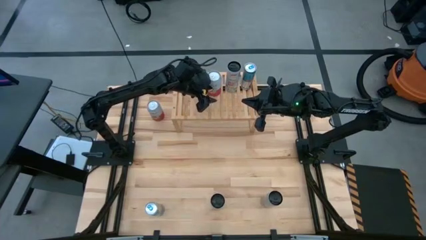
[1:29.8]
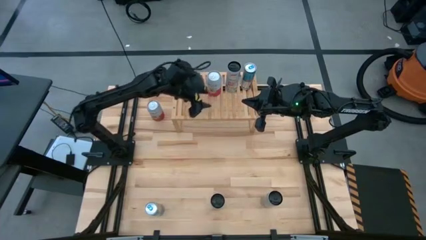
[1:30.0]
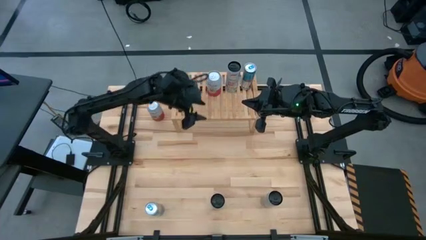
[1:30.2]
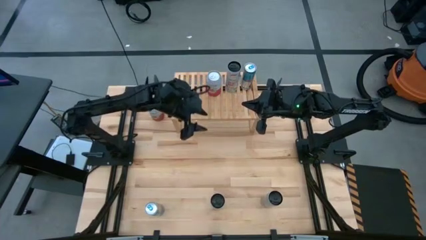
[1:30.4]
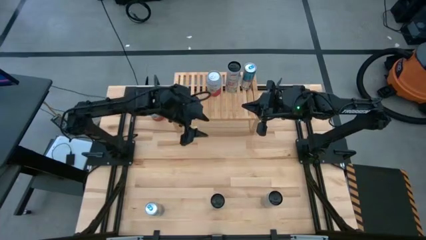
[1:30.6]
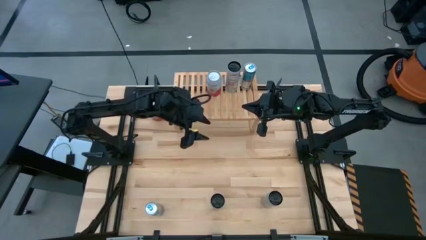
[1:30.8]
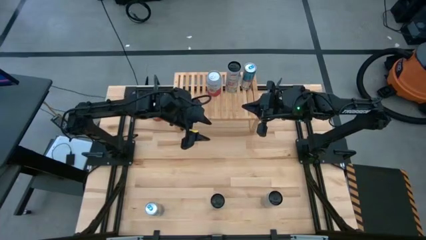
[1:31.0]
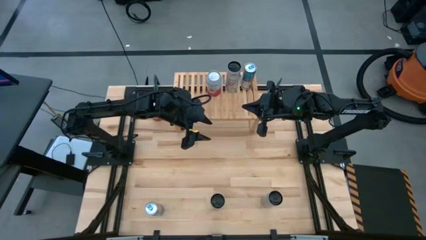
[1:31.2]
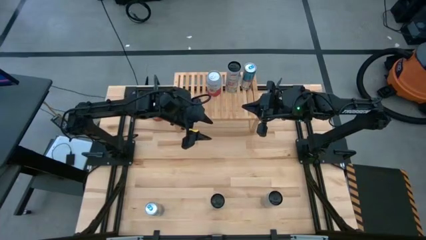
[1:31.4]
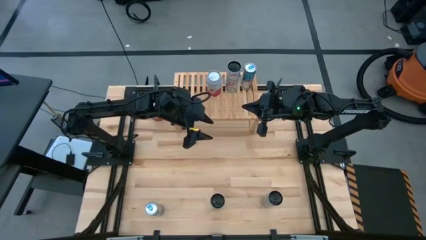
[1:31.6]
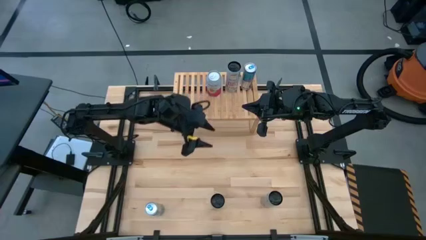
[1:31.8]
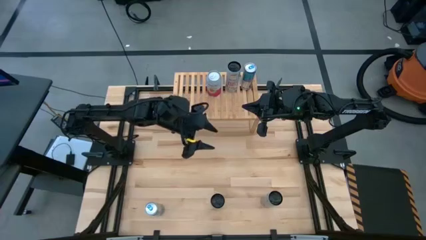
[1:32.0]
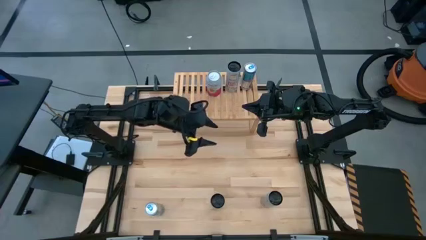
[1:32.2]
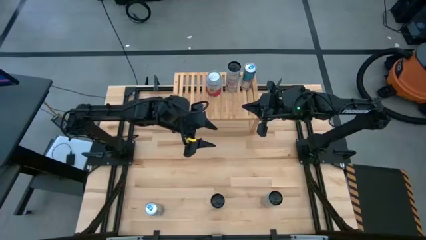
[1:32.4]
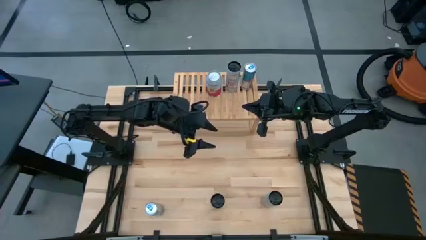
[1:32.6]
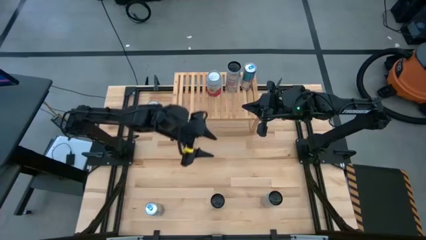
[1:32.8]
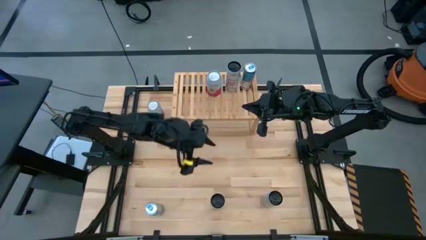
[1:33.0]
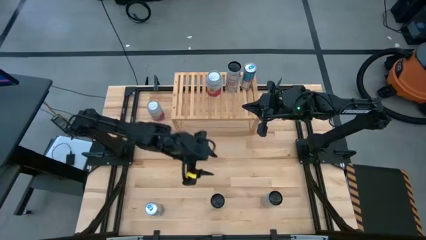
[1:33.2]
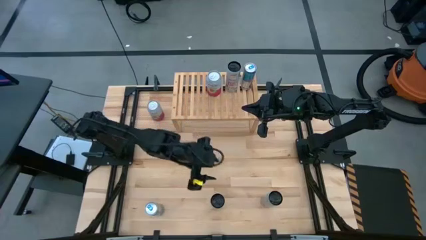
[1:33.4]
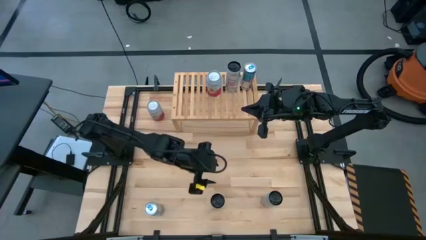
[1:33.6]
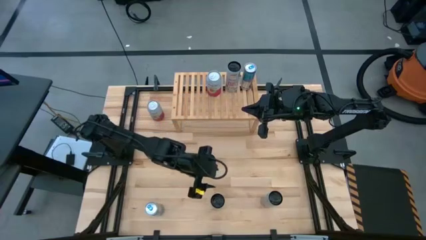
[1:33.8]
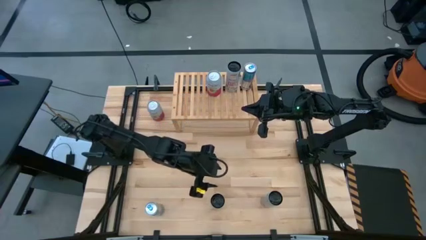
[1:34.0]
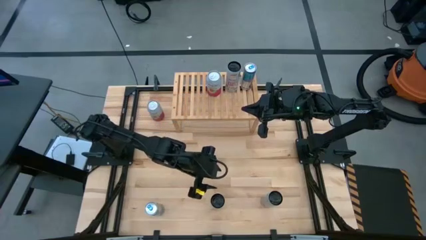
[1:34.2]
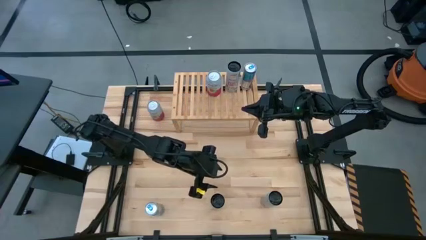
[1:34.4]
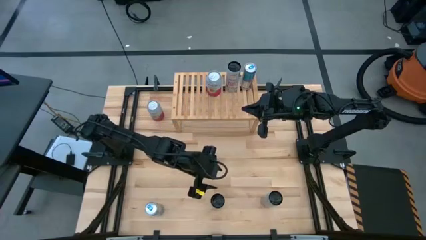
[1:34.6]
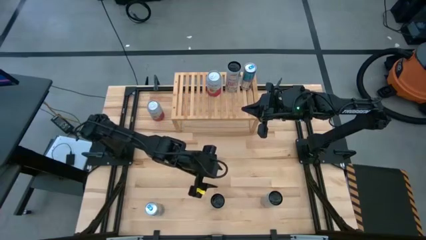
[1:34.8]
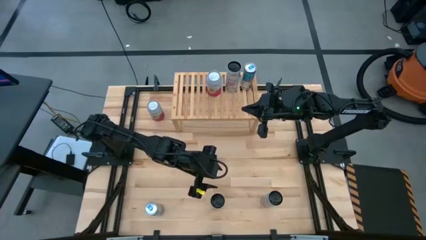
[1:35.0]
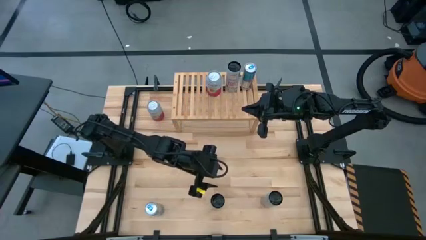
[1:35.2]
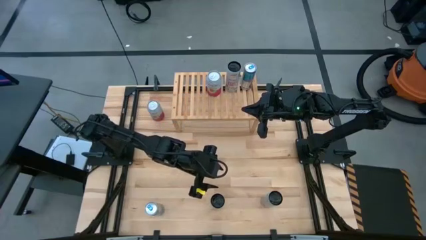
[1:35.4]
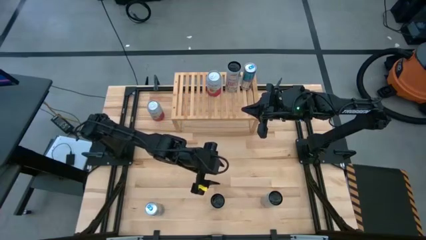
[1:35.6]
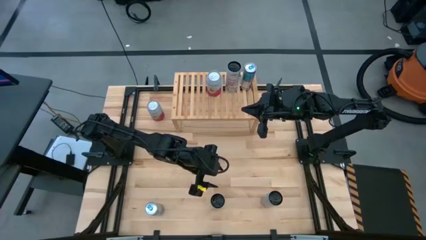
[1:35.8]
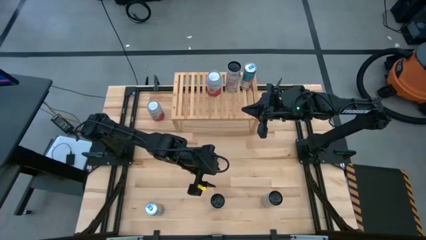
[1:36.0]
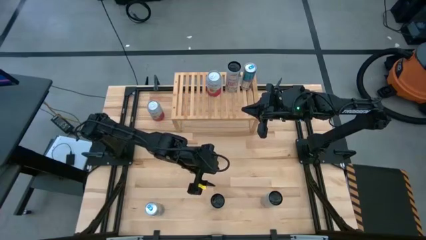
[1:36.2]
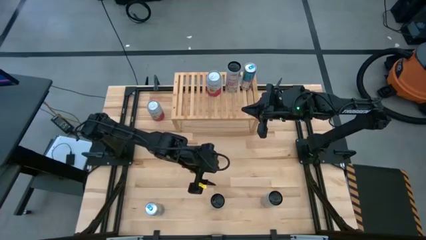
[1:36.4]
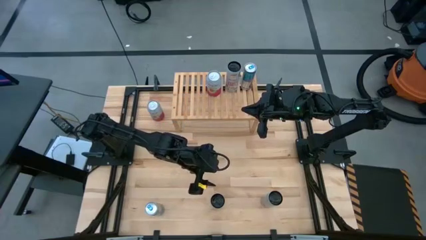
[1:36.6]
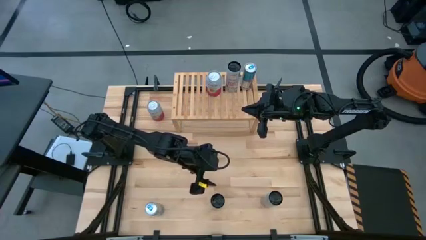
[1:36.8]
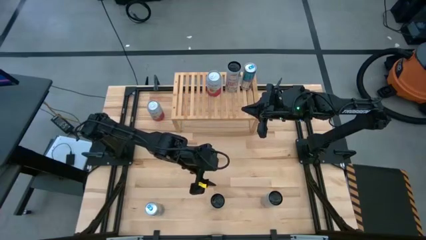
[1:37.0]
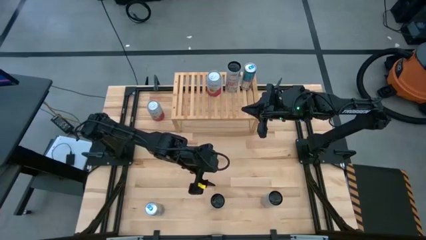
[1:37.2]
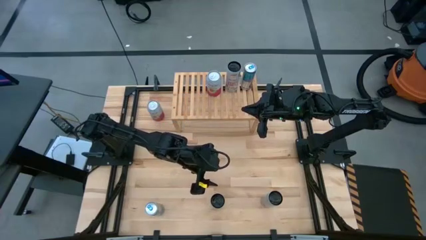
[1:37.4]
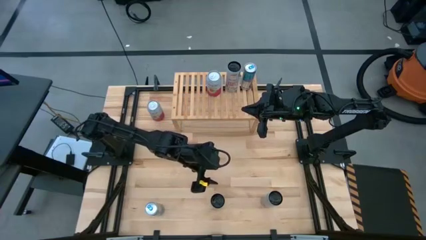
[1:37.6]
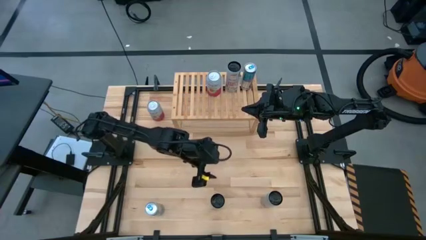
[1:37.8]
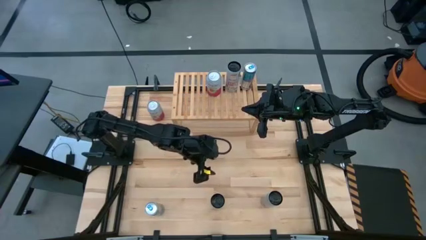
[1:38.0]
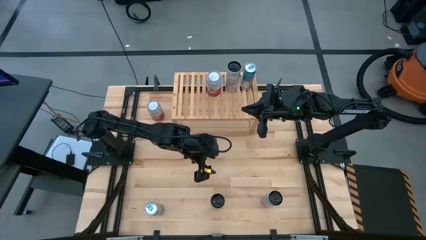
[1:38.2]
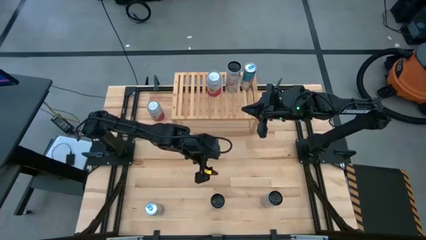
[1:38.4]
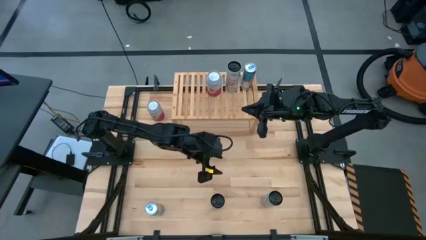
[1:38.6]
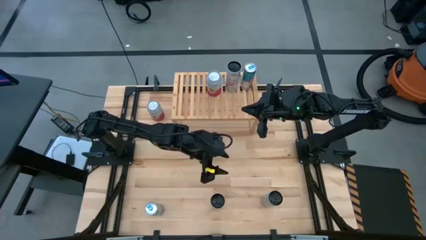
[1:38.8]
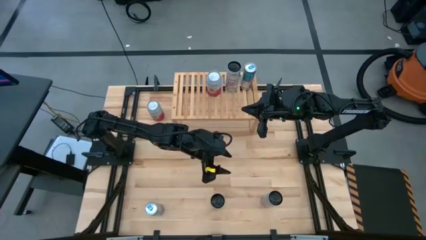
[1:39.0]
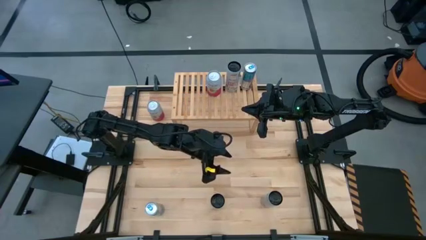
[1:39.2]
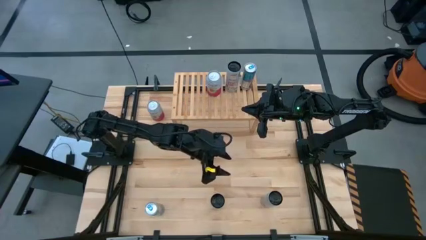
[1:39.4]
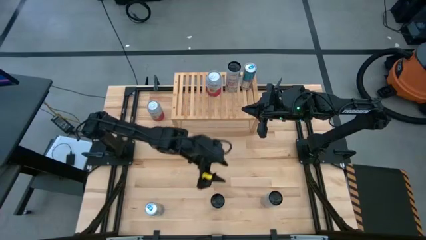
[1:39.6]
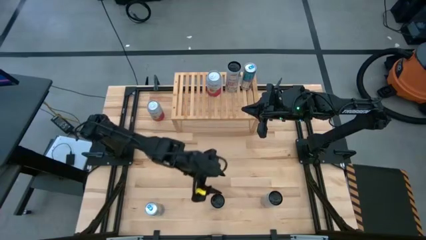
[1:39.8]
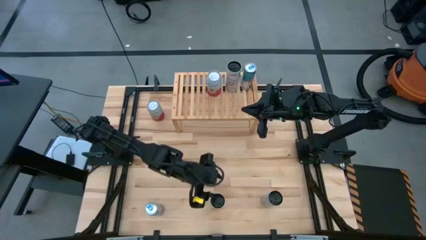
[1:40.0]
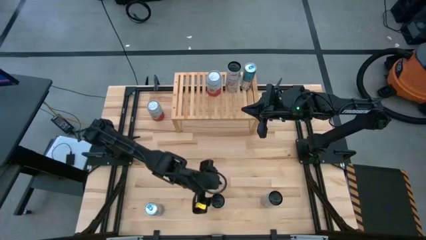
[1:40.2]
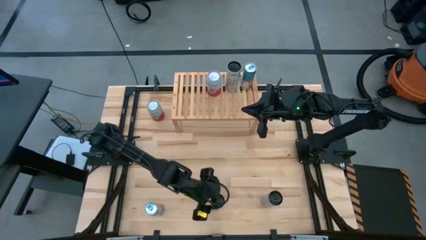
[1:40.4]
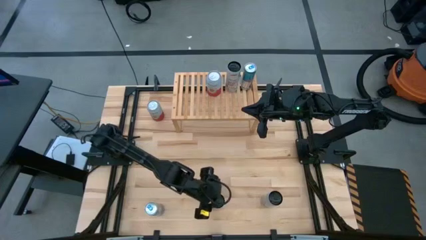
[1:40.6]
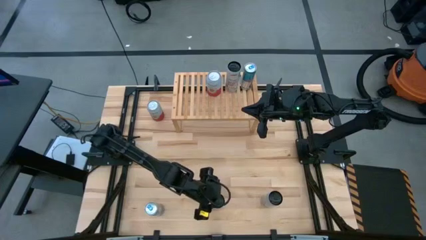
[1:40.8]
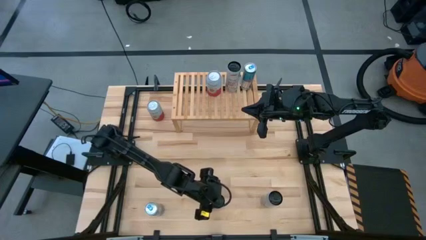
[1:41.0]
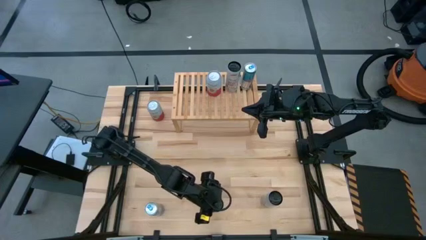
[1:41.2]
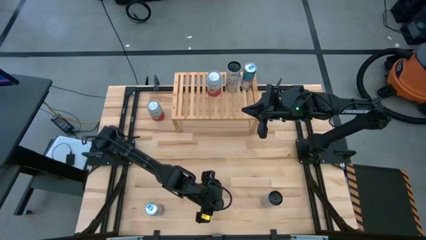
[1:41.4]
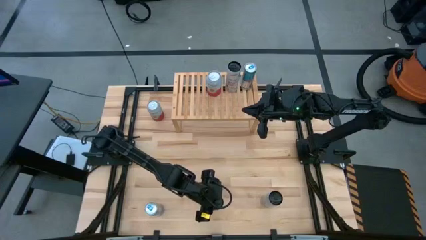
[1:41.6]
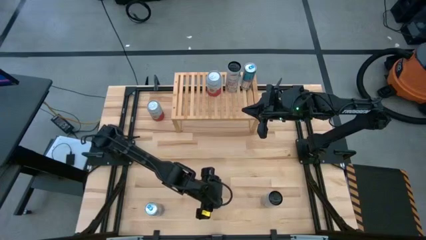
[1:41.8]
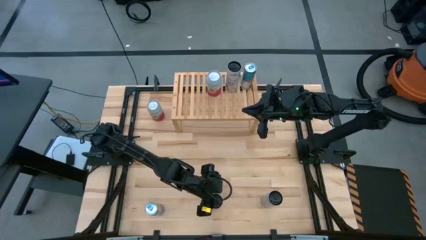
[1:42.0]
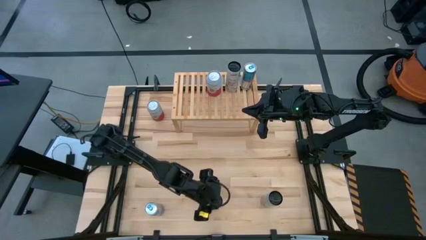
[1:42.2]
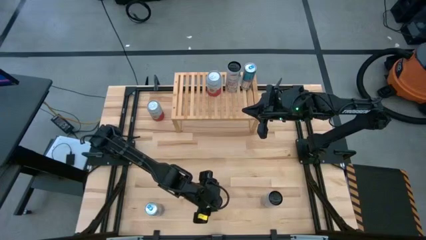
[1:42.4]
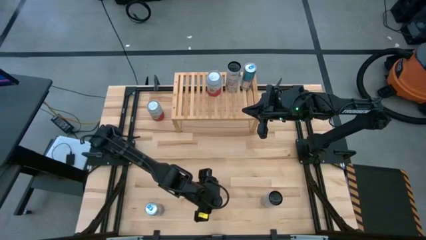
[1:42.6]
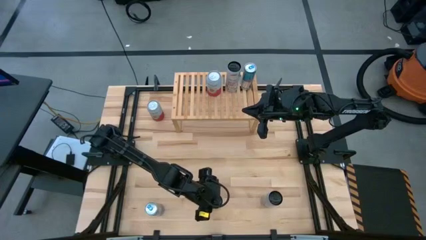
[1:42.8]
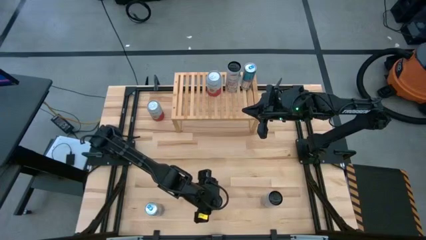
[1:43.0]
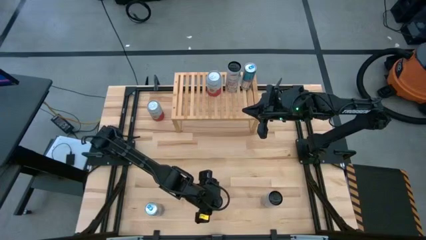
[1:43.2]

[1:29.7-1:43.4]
Task: Place canned beverage on shelf
Put the bottom white yellow soda can on the shelf
